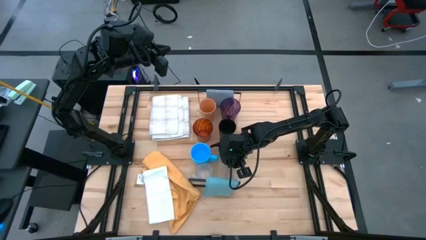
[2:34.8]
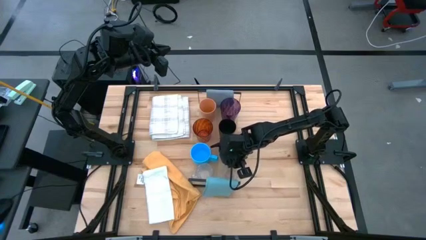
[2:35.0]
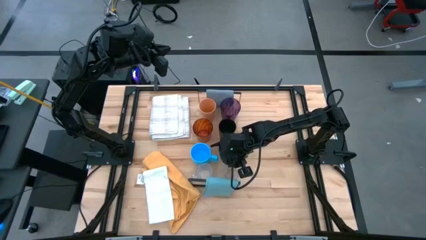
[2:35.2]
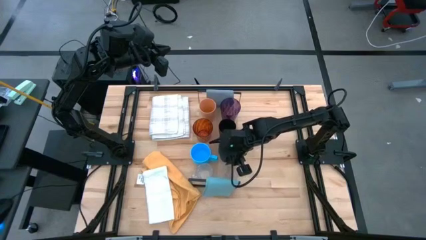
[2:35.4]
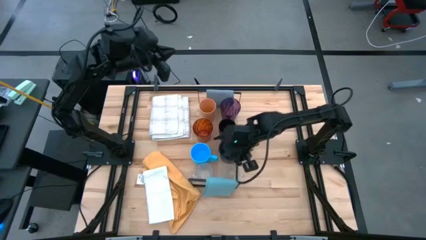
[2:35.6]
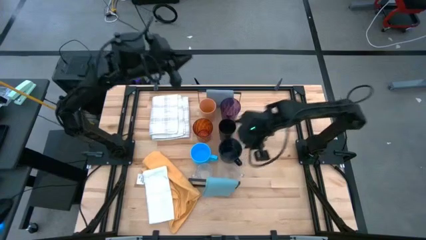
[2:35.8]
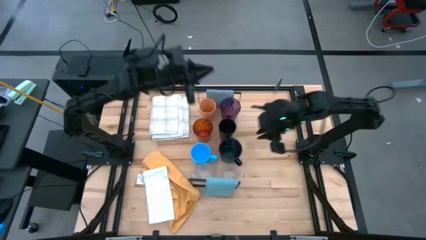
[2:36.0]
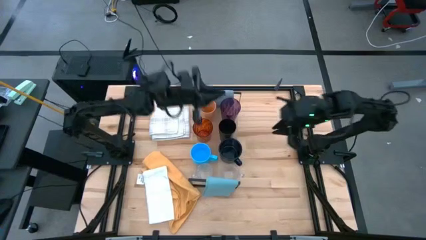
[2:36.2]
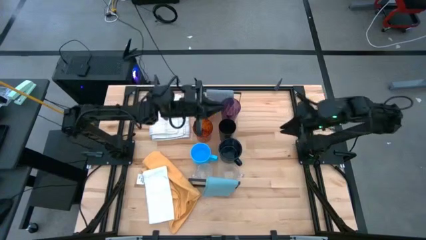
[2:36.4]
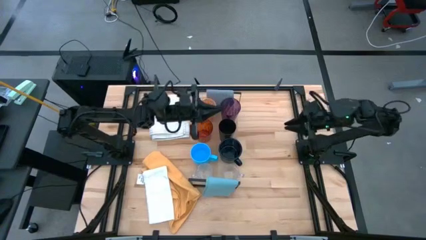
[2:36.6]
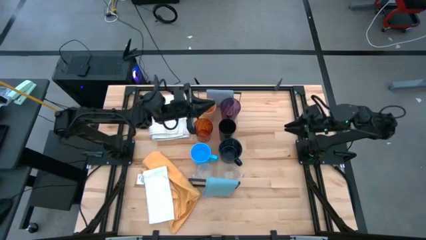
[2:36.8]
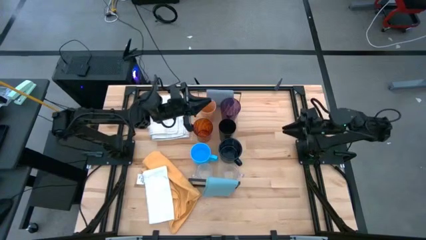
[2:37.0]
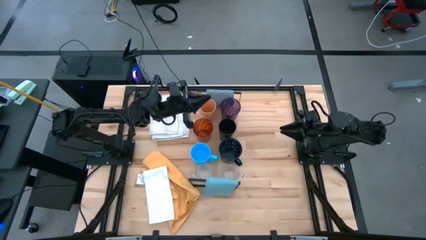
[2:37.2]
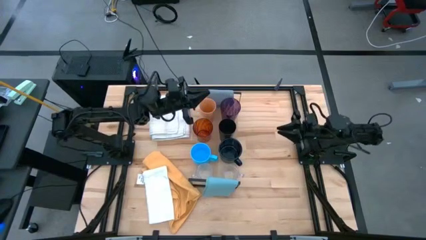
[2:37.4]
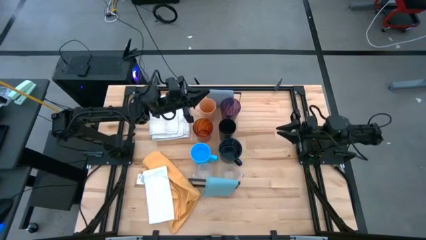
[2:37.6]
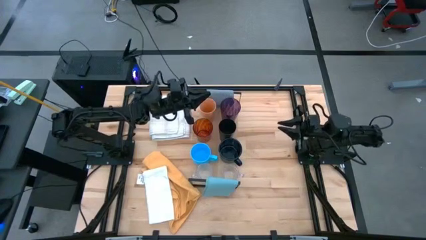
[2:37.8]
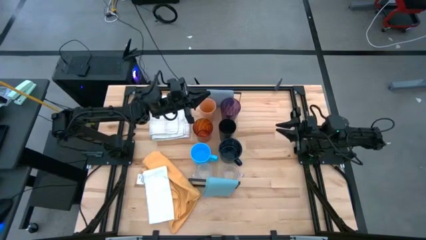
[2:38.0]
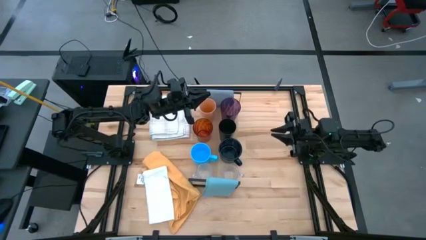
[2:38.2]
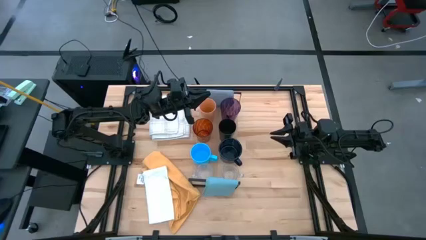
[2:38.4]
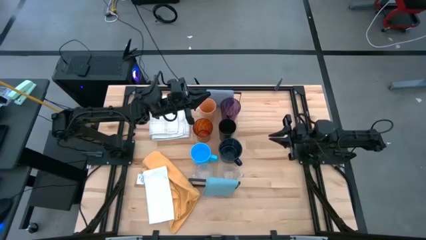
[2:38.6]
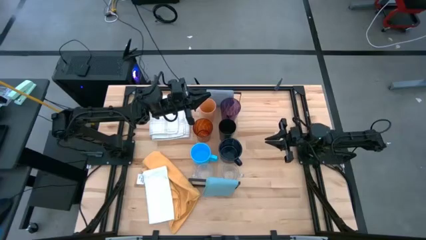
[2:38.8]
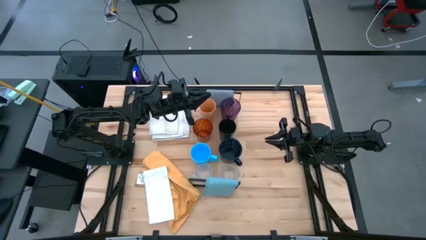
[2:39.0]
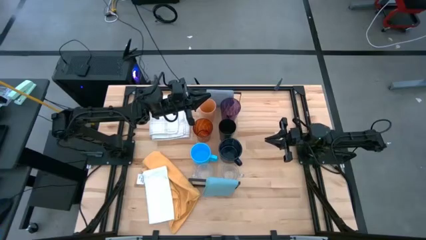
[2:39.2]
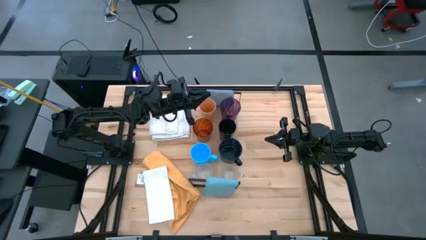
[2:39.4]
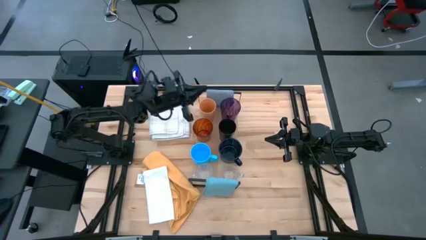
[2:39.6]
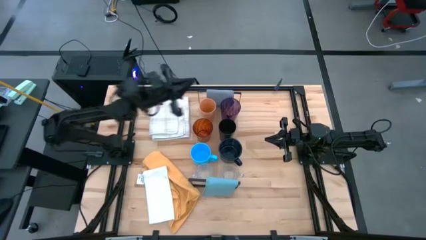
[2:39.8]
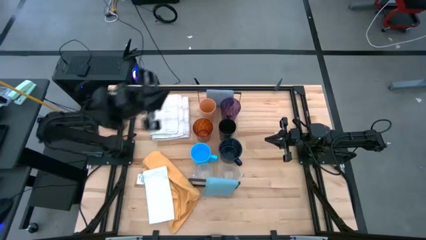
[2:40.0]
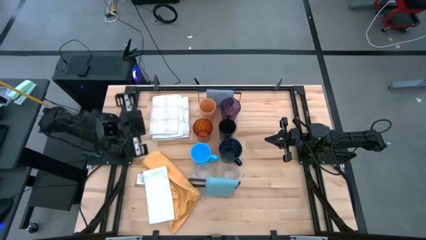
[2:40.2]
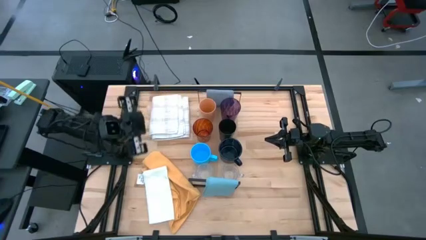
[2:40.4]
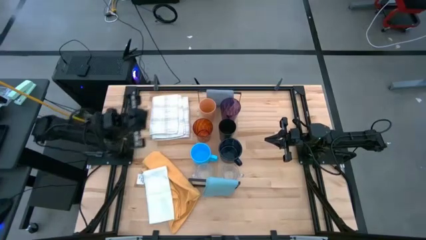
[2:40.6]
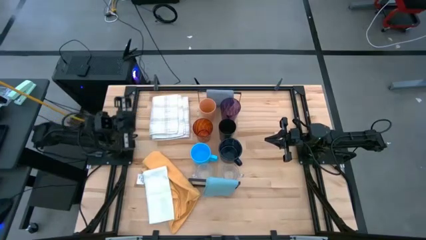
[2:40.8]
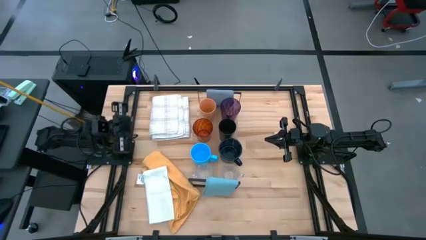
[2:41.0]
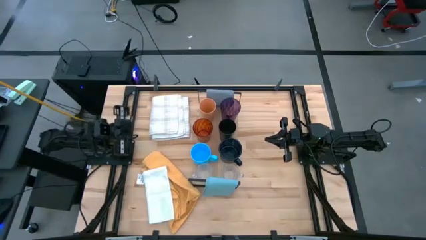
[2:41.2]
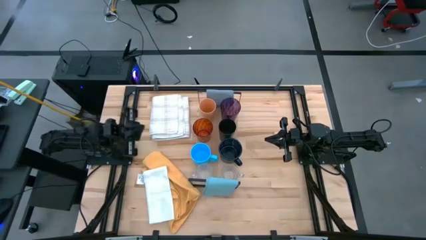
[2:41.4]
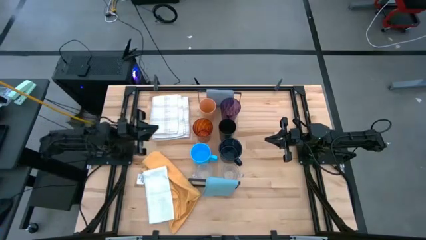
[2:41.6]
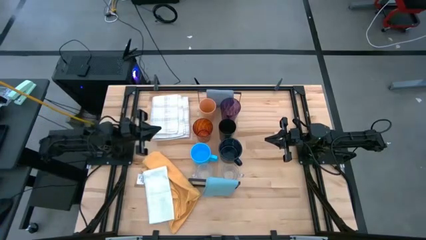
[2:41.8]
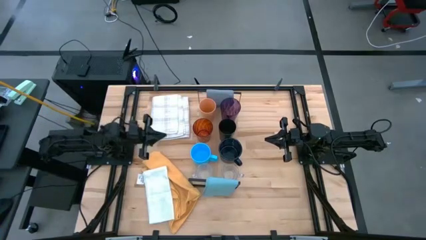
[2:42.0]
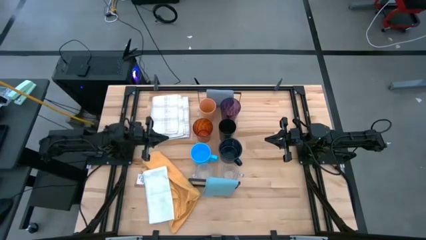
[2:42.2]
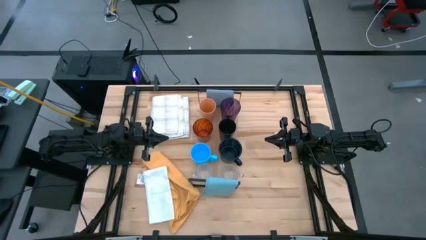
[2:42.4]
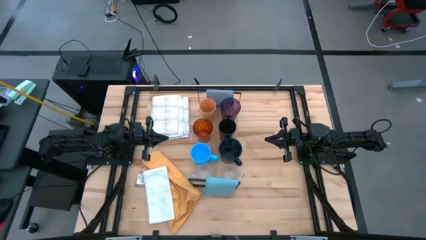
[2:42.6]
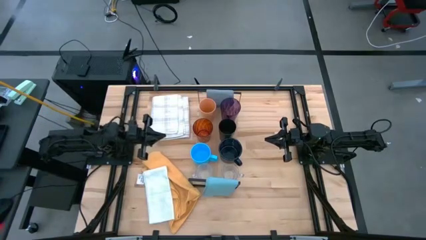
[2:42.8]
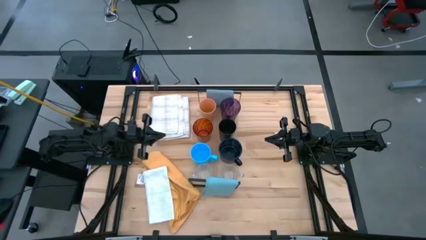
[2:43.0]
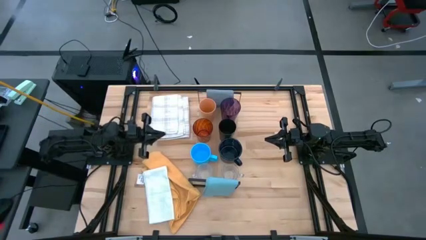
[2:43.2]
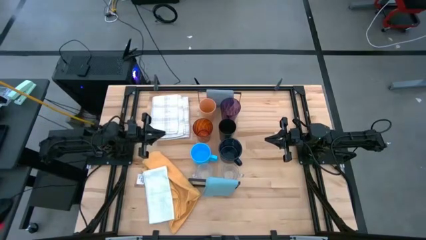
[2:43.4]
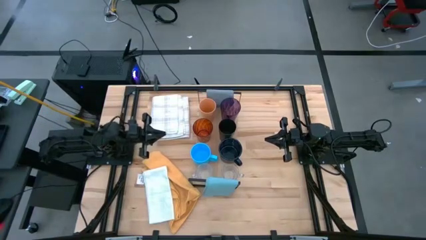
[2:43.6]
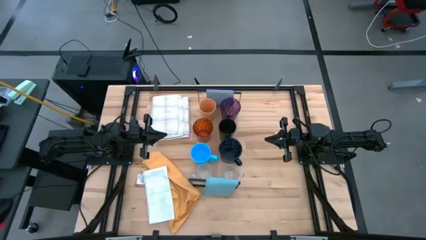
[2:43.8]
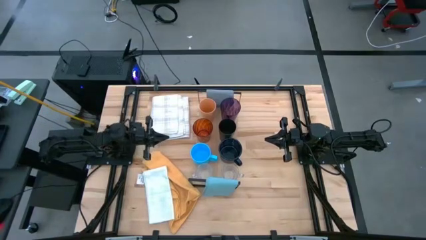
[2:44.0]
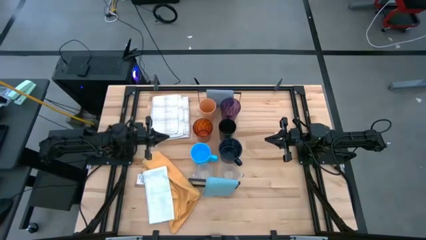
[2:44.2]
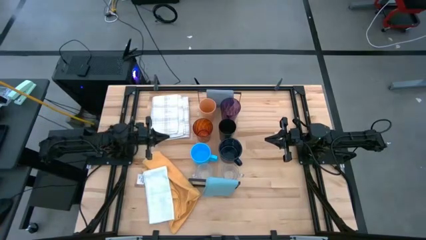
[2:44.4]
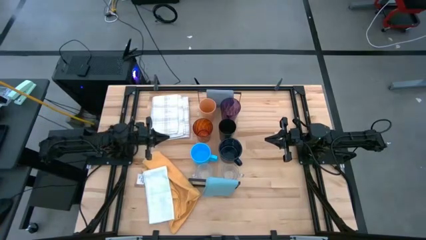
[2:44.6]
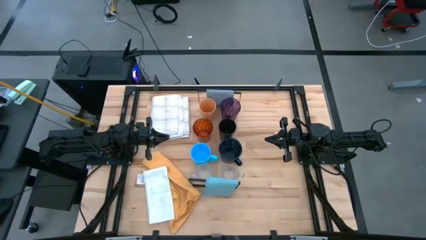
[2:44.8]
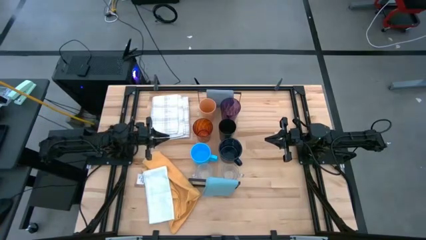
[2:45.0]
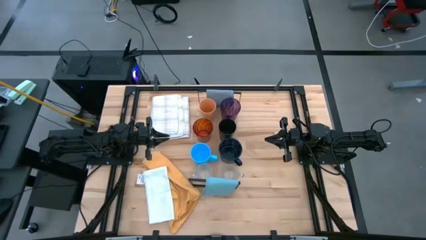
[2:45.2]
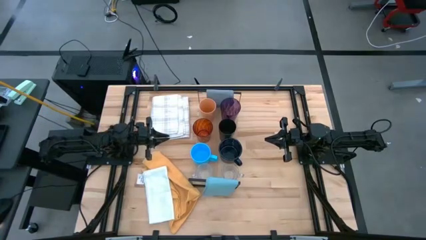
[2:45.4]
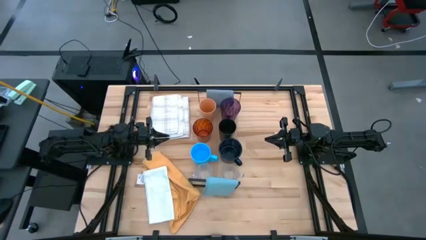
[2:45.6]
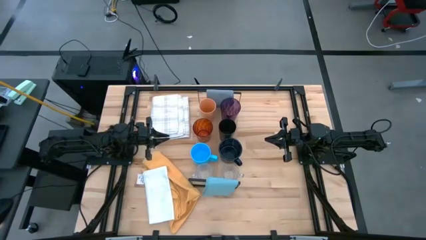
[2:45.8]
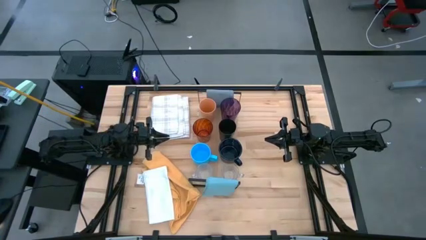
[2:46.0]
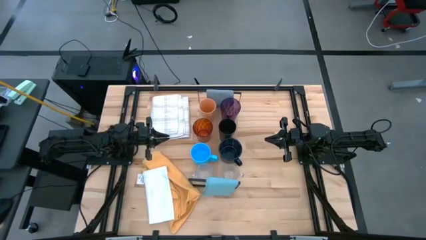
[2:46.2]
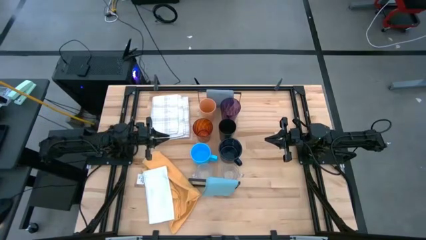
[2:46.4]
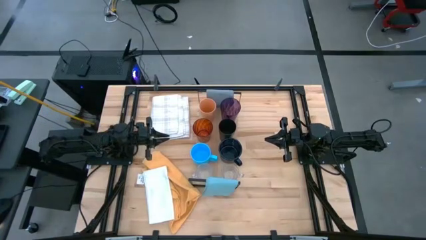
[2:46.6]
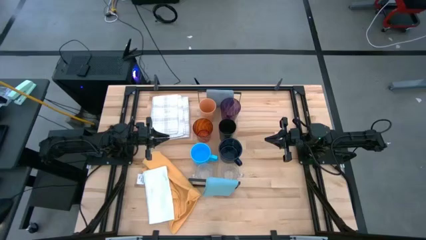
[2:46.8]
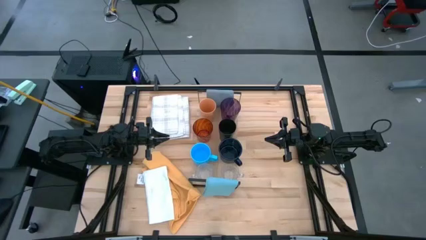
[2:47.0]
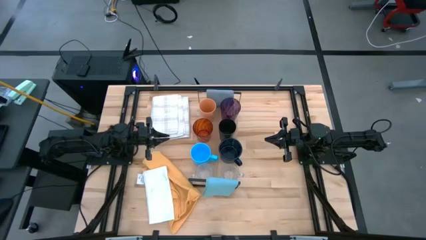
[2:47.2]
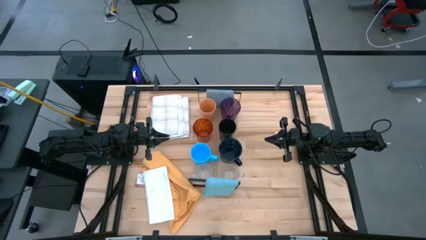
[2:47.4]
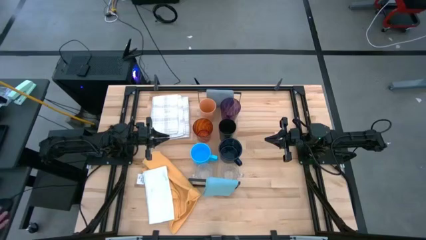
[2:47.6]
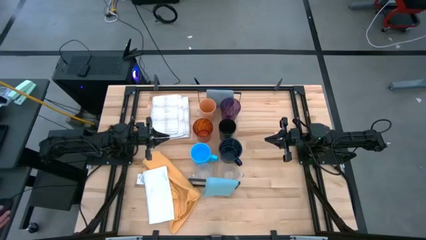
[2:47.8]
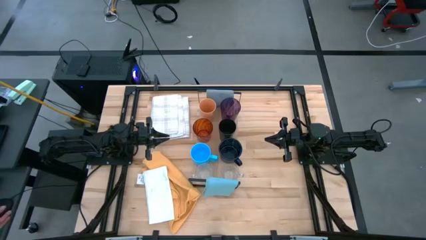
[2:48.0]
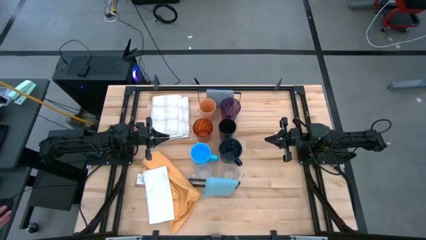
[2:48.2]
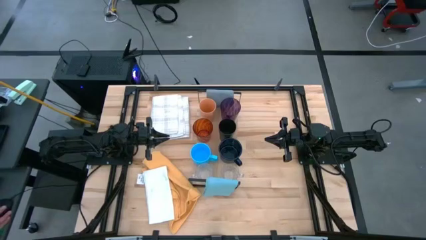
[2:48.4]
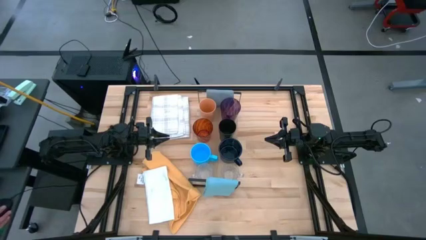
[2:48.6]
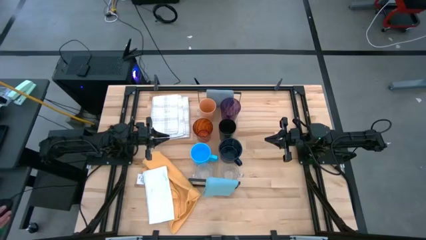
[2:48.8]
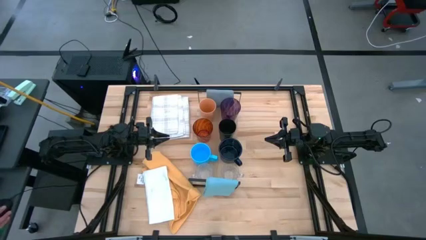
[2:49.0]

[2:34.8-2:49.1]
Task: Stack small to large cups/mugs on shelf
Return to Home Position

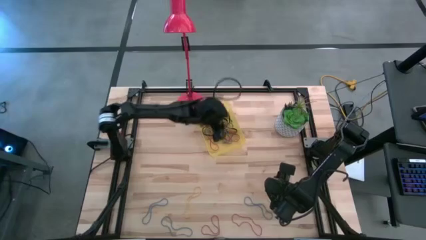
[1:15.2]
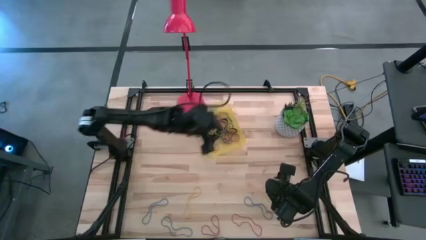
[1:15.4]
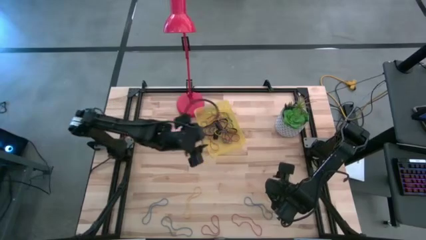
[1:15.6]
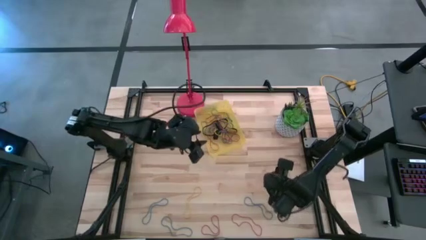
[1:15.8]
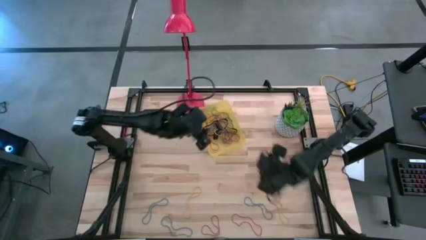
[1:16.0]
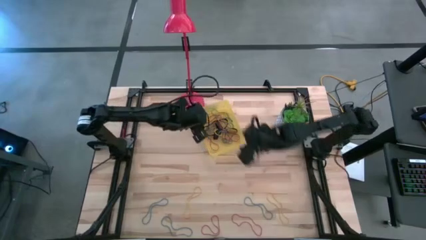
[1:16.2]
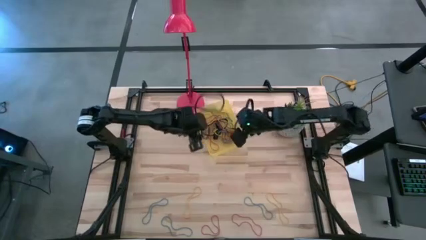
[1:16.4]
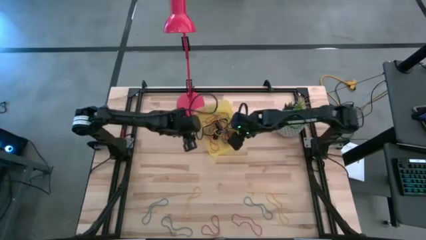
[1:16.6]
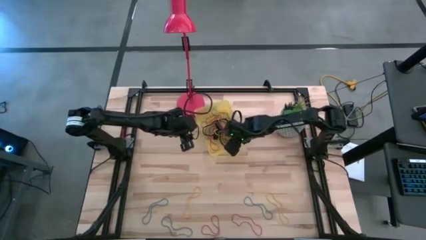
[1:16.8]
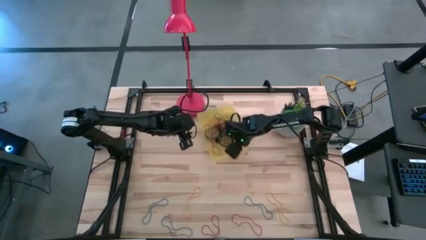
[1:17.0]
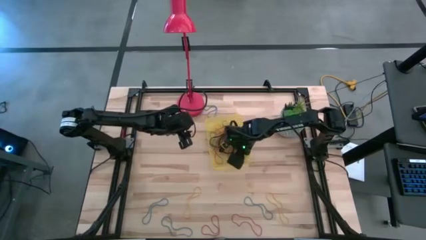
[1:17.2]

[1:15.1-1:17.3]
Task: Pick and place rubber bands into bin
Adjust the yellow bin
